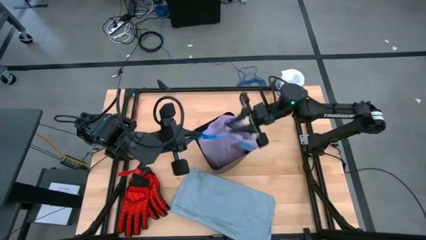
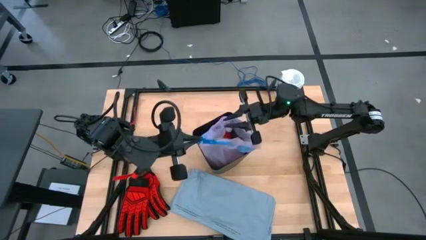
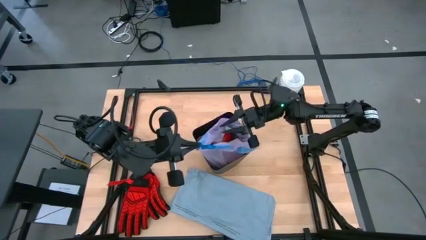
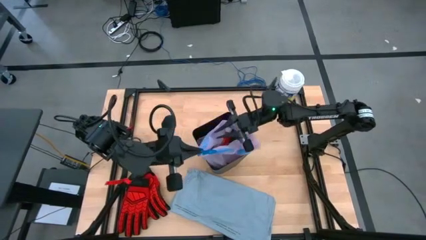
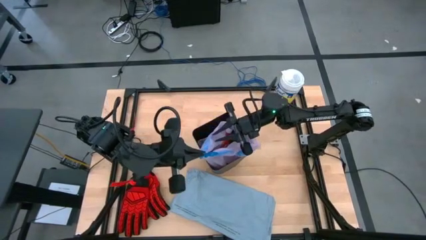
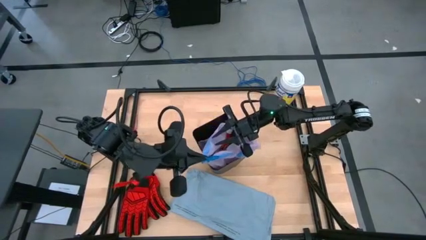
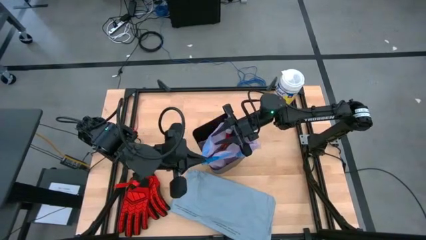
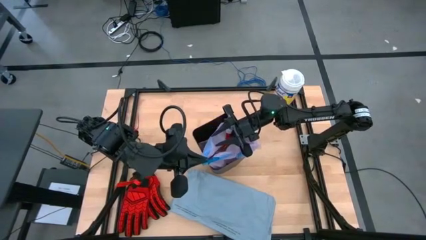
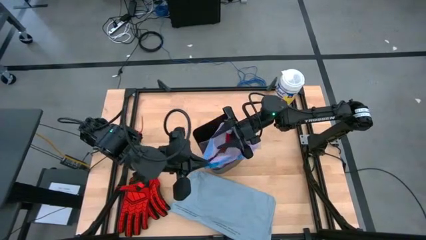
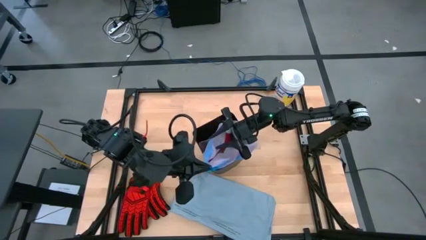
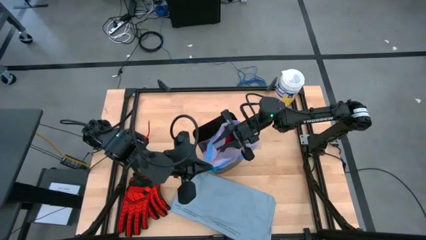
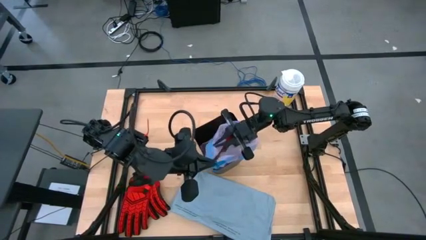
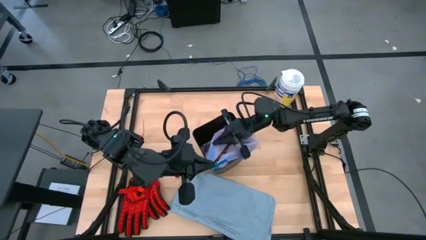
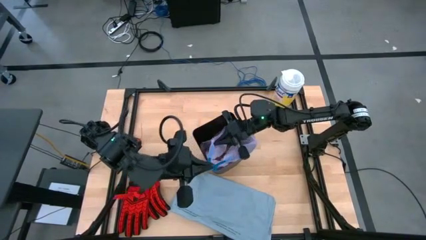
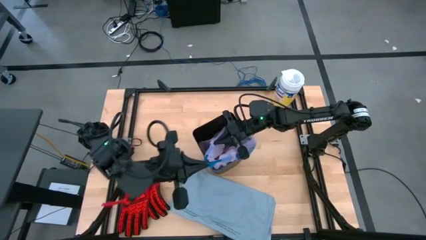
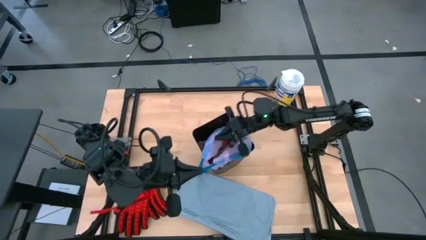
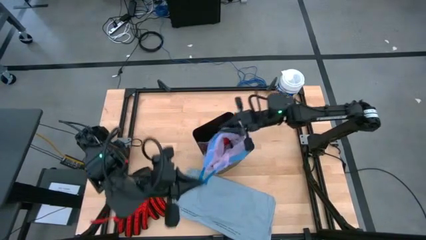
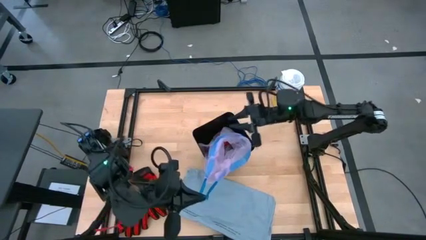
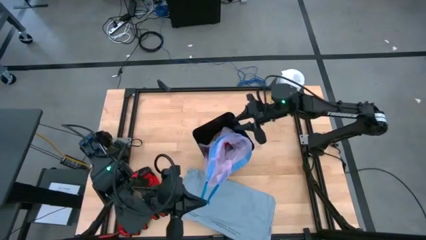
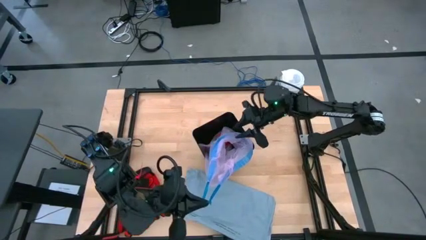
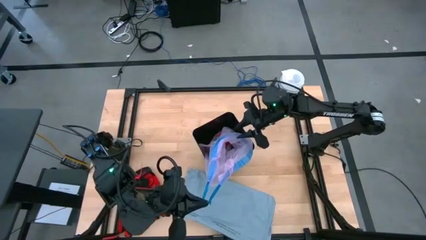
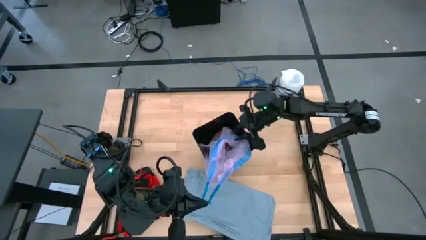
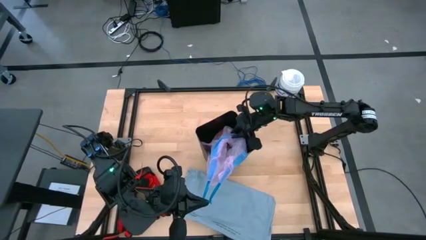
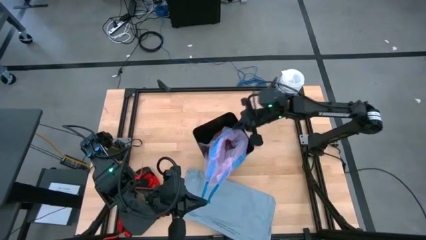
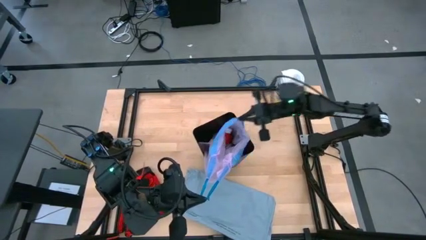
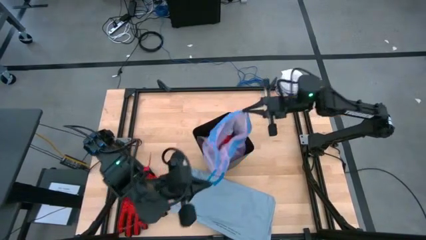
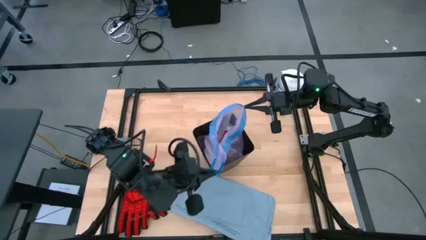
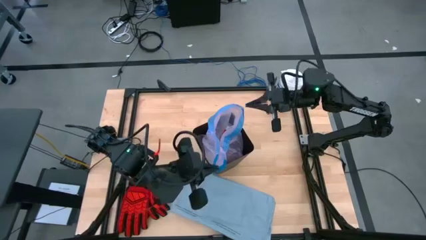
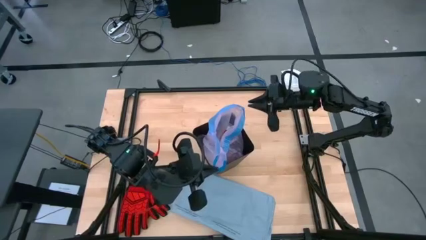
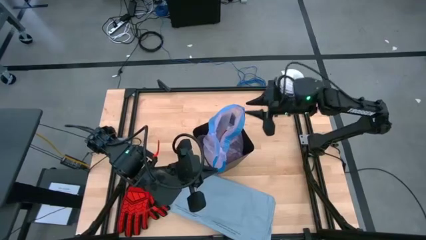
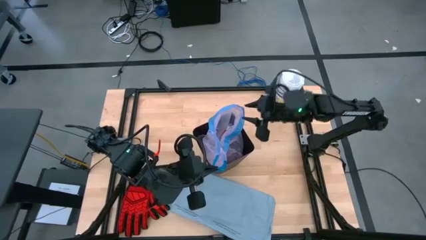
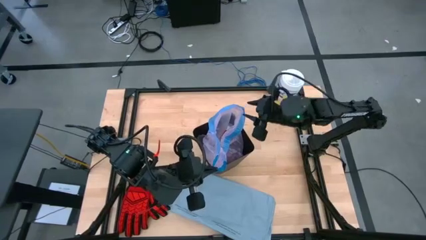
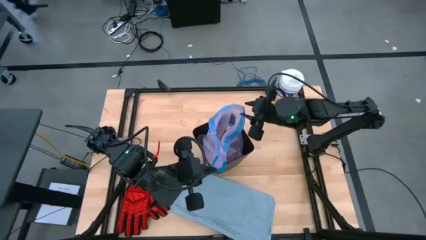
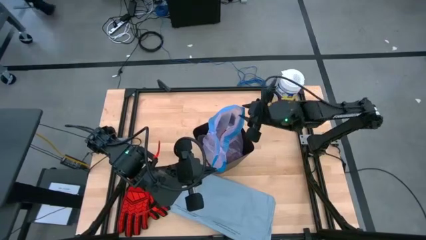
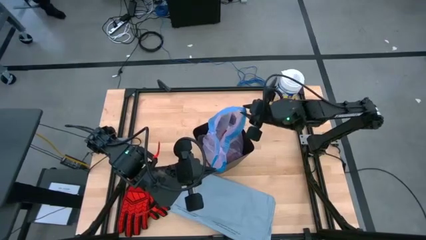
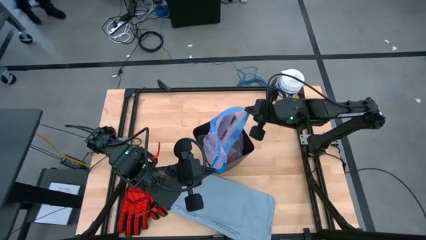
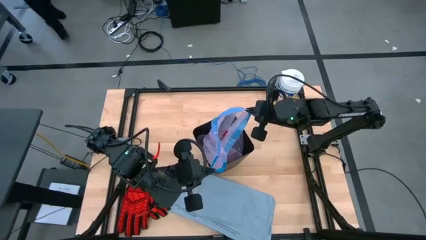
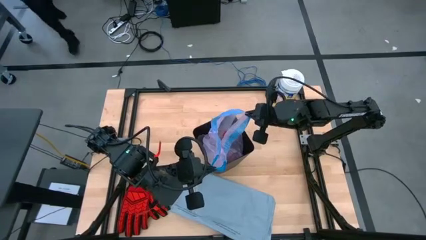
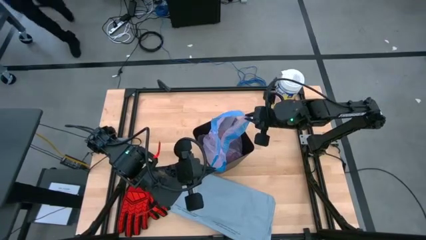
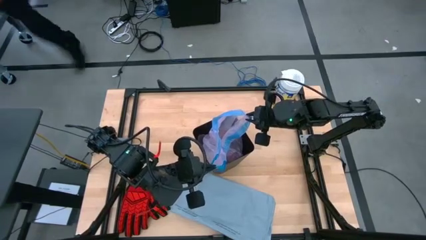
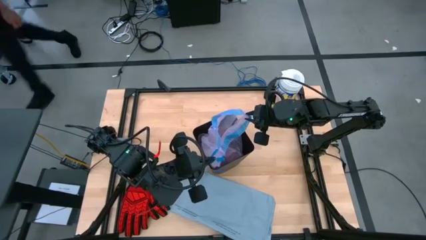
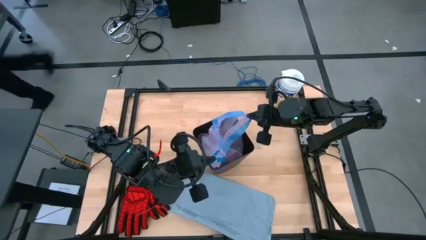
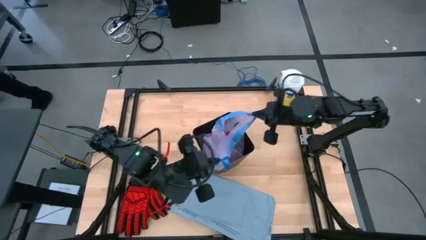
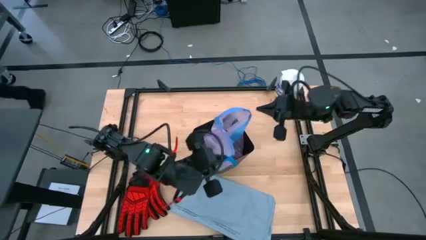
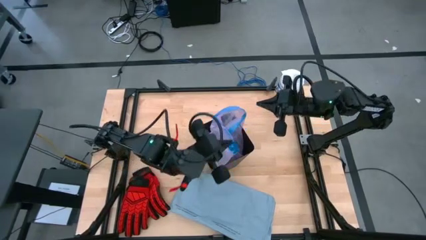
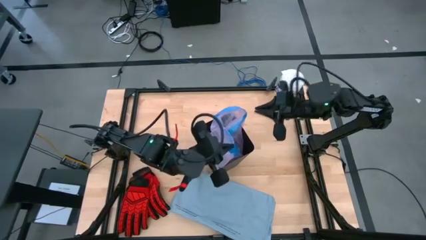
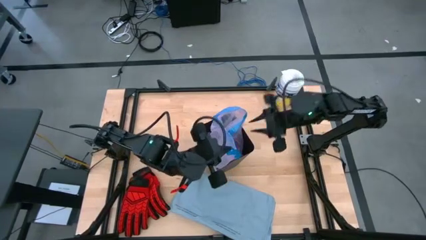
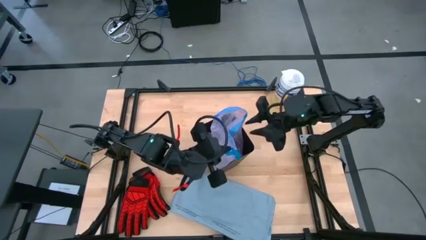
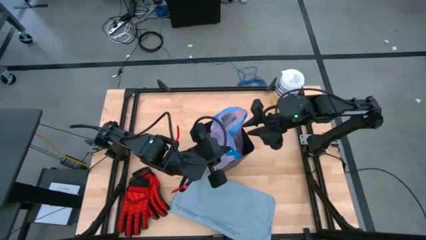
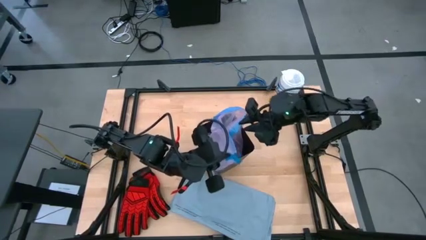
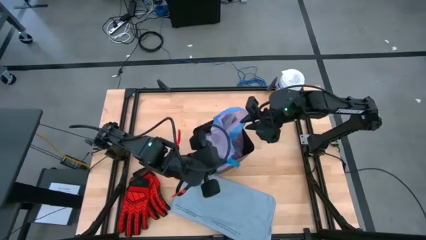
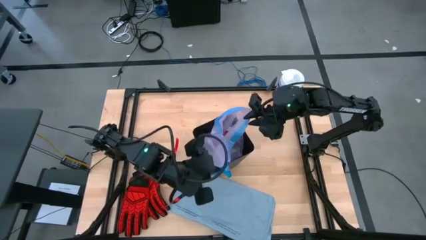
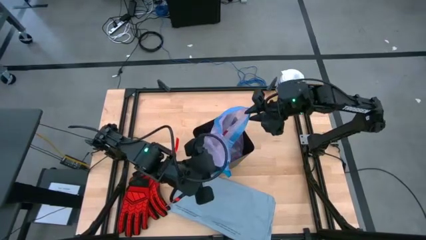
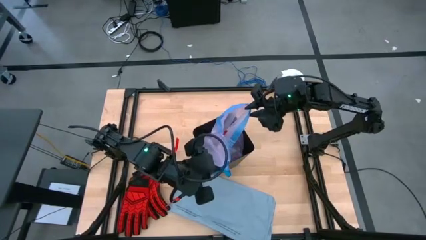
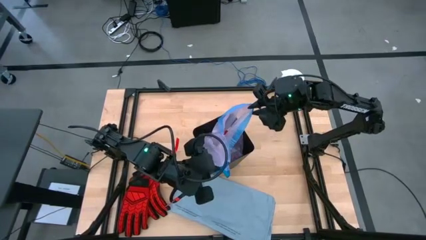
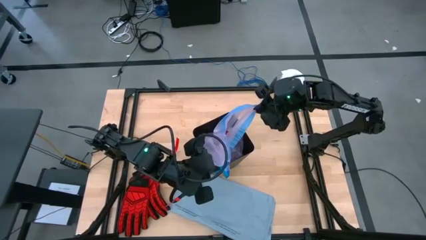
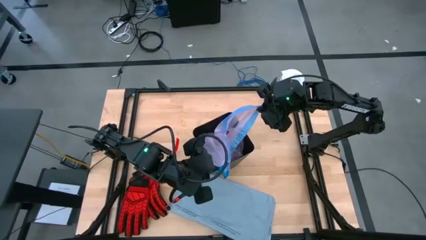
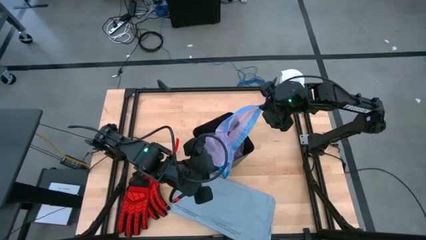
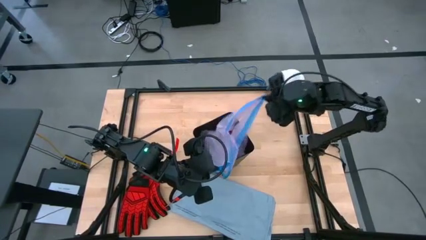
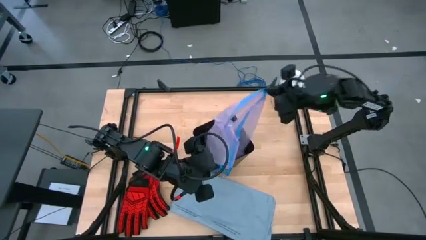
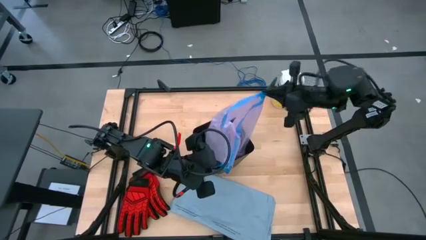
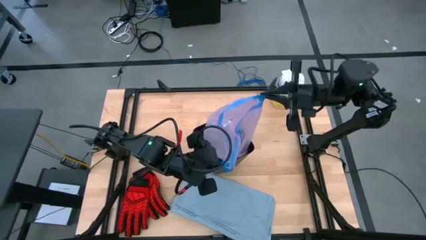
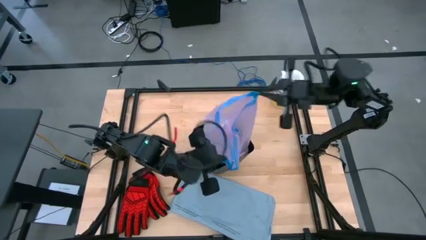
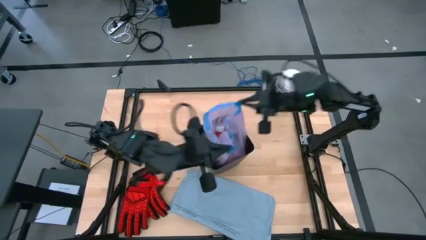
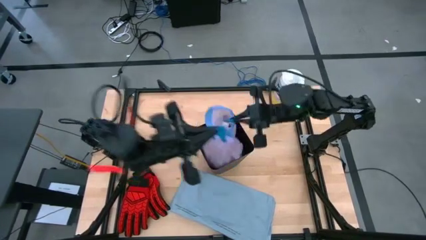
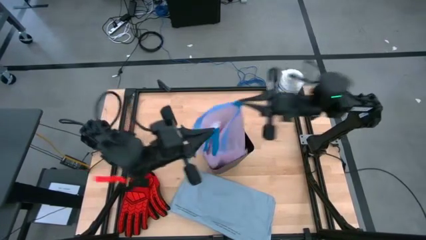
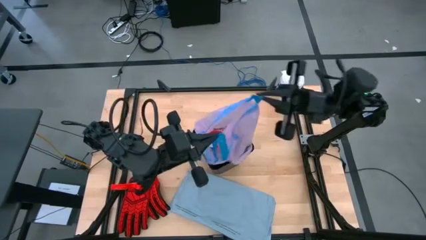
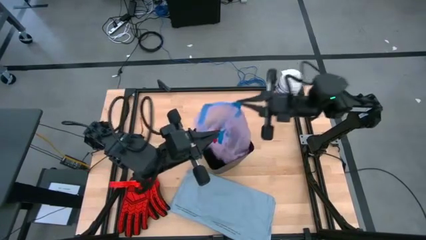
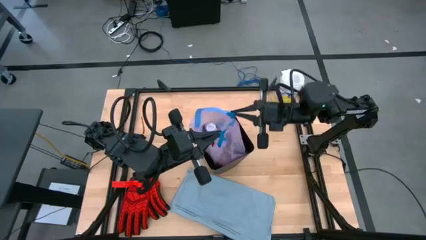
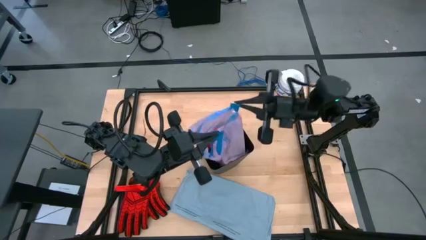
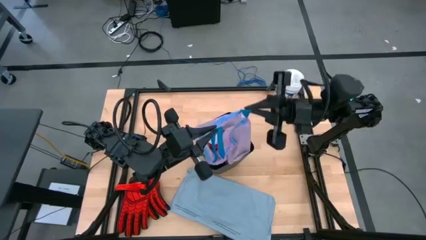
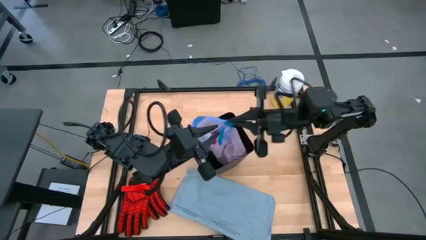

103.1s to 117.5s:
Task: place trash/remove bag and relplace
Remove the pink trash bag from the trash bin

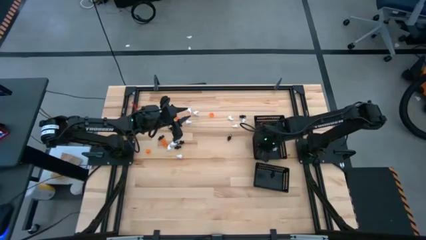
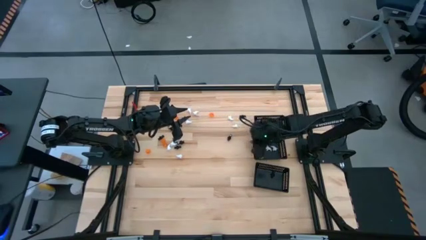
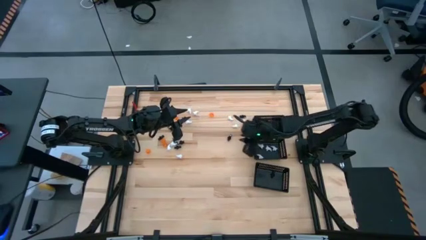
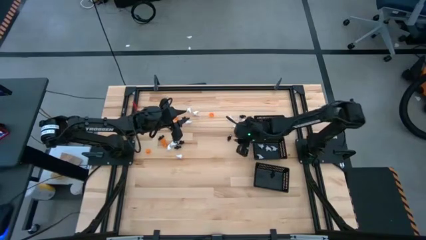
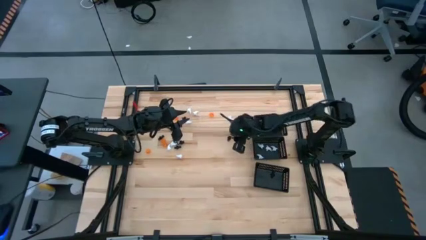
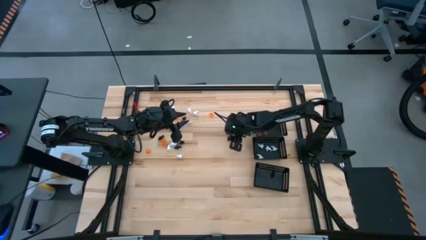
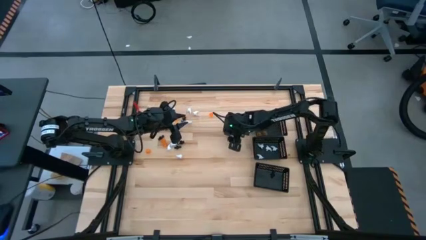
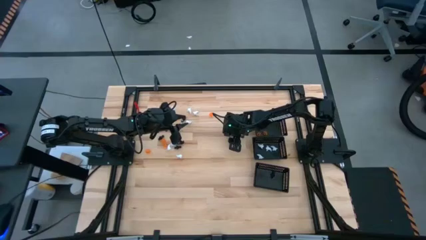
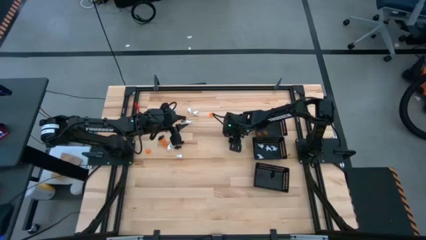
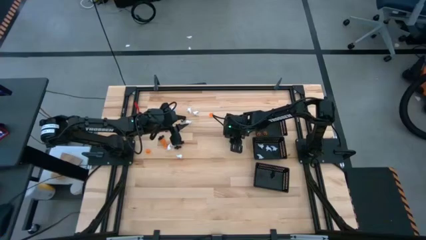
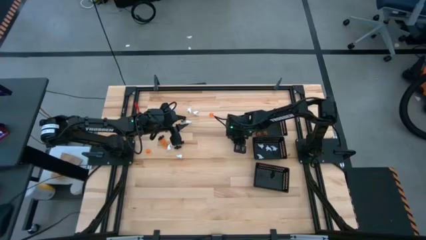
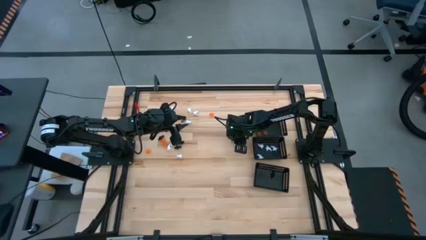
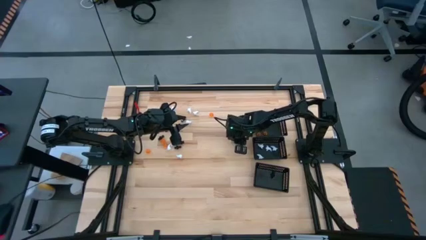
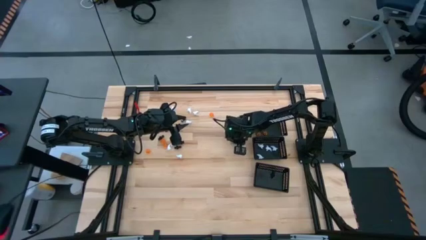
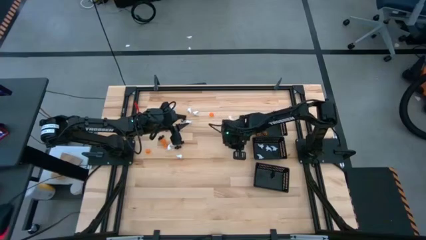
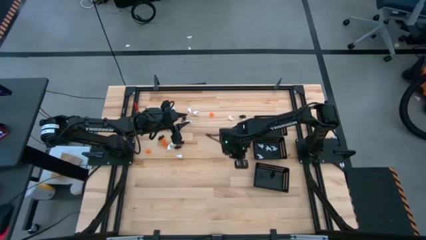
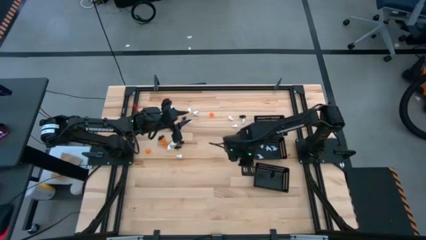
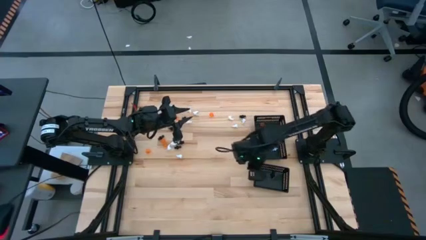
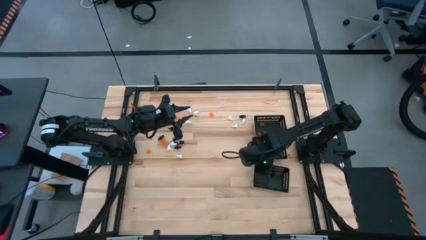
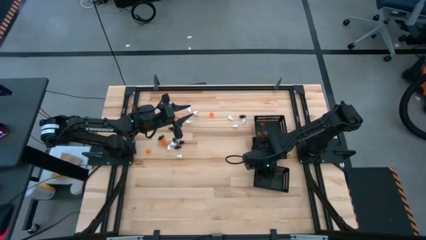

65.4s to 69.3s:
Task: Sort Halloween decoration
Put the black skeleton toy into the bottom black bin
